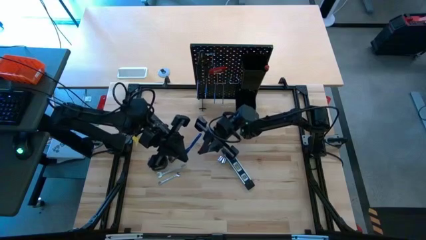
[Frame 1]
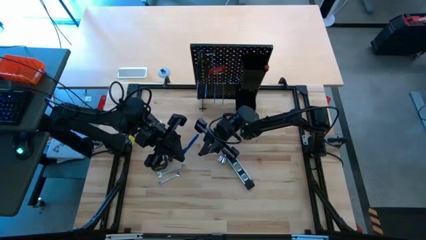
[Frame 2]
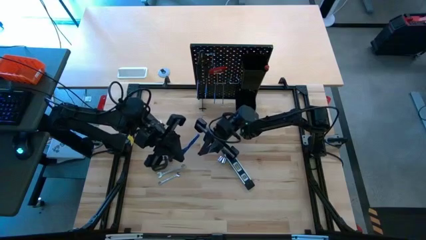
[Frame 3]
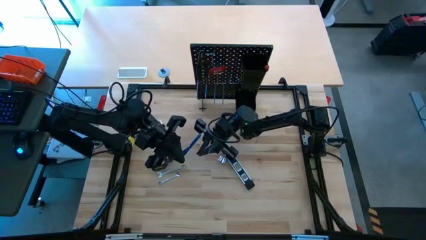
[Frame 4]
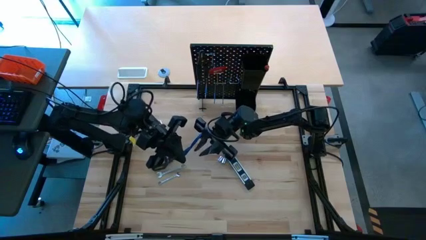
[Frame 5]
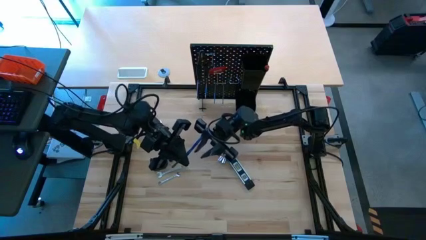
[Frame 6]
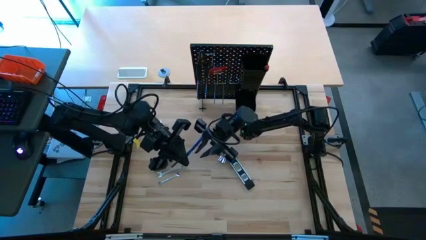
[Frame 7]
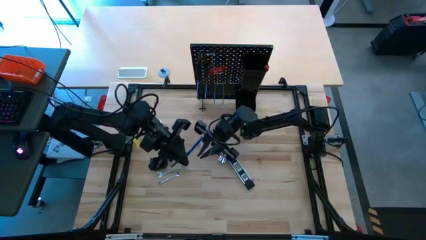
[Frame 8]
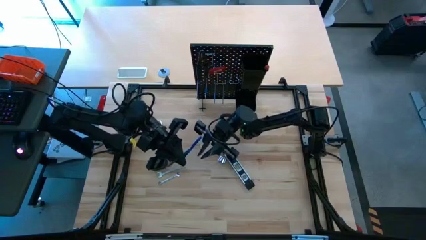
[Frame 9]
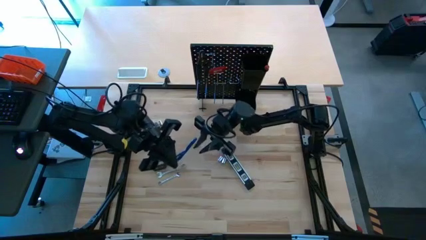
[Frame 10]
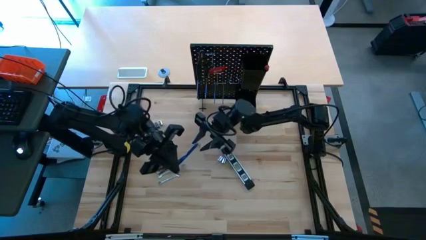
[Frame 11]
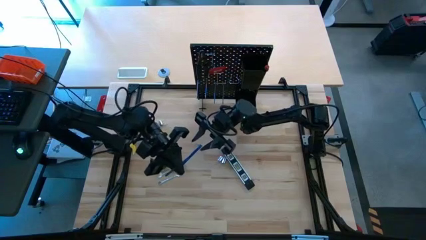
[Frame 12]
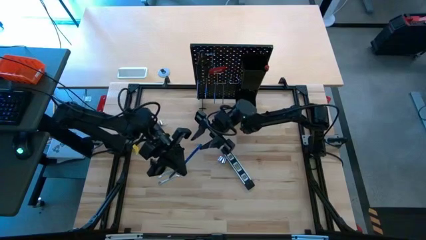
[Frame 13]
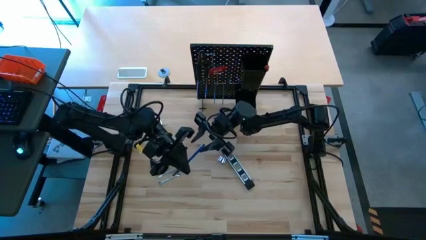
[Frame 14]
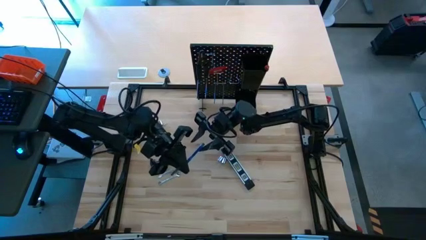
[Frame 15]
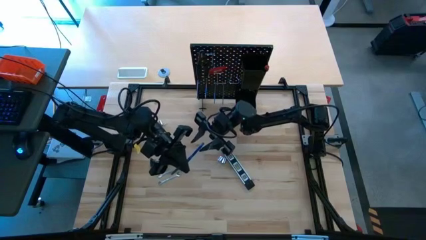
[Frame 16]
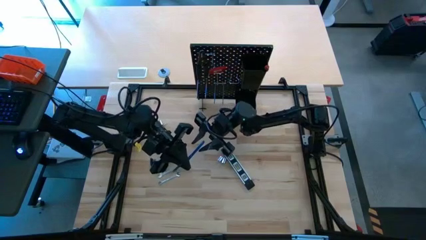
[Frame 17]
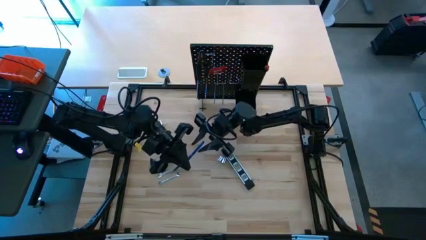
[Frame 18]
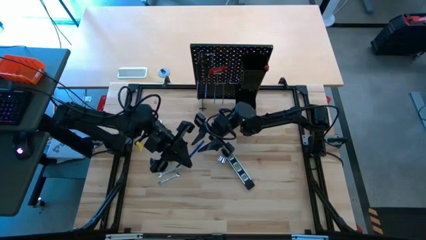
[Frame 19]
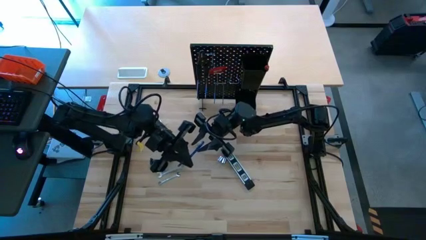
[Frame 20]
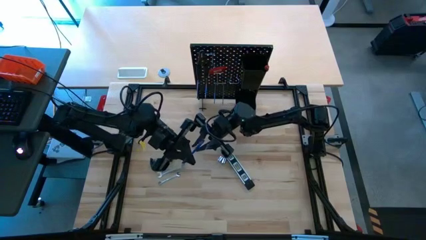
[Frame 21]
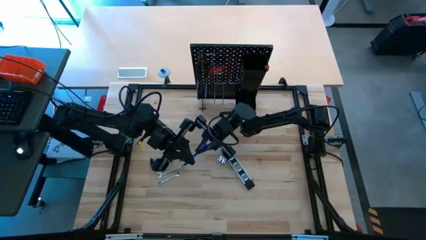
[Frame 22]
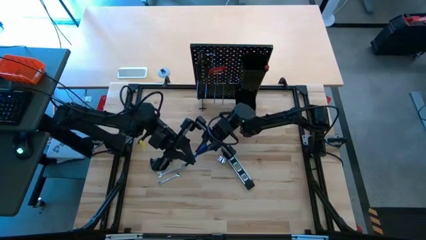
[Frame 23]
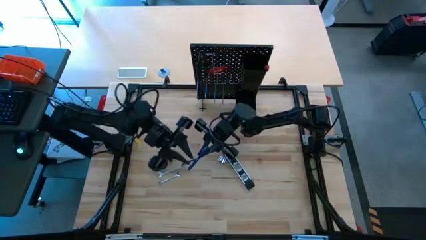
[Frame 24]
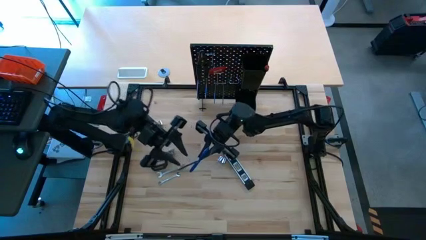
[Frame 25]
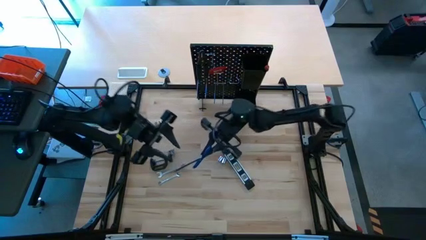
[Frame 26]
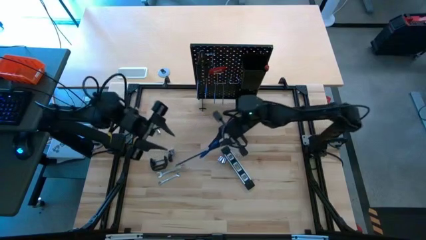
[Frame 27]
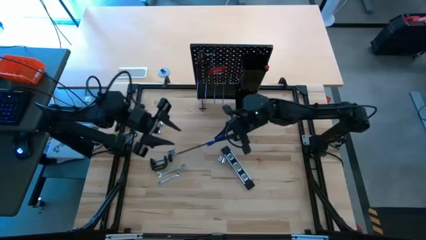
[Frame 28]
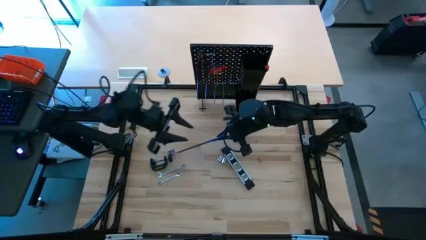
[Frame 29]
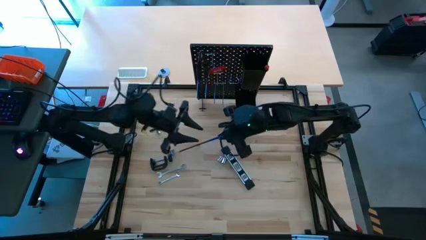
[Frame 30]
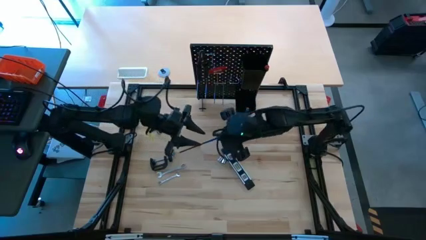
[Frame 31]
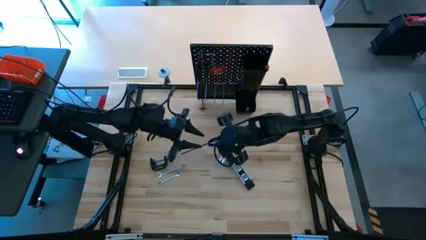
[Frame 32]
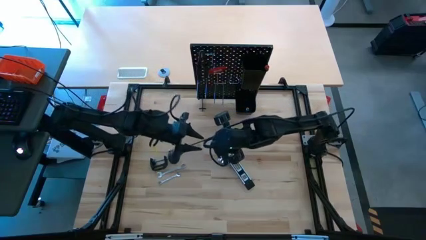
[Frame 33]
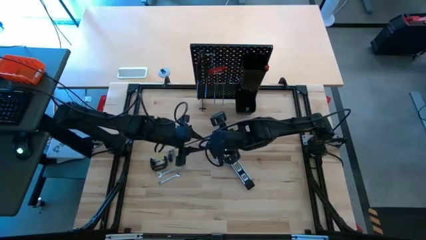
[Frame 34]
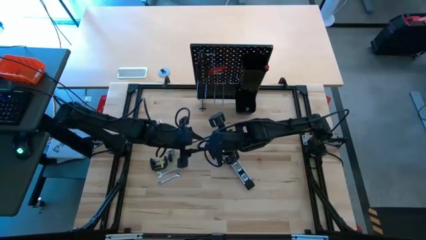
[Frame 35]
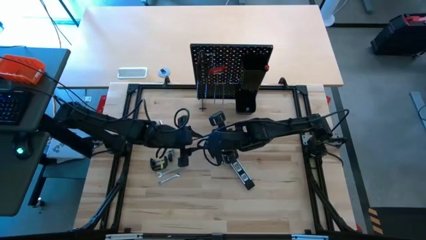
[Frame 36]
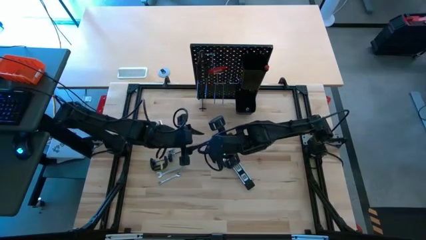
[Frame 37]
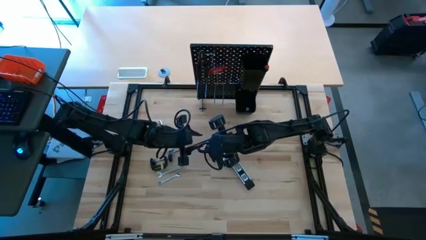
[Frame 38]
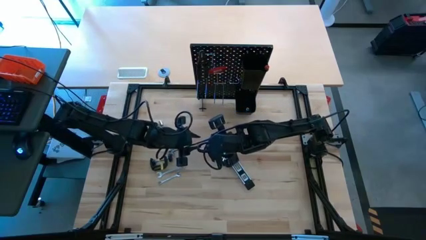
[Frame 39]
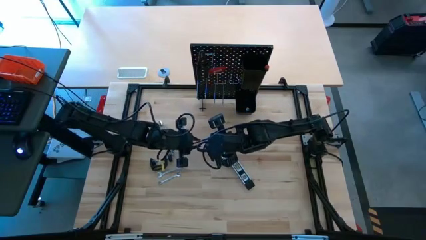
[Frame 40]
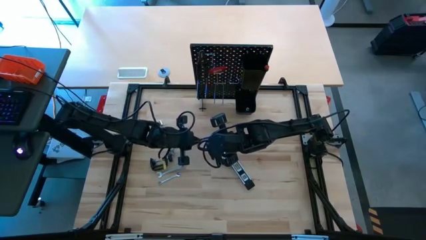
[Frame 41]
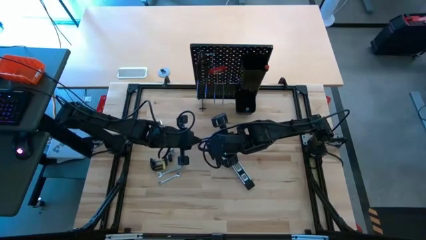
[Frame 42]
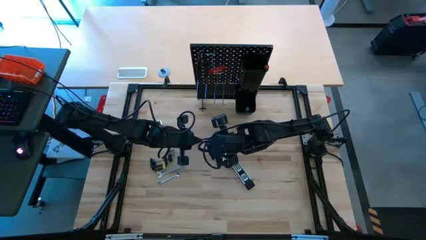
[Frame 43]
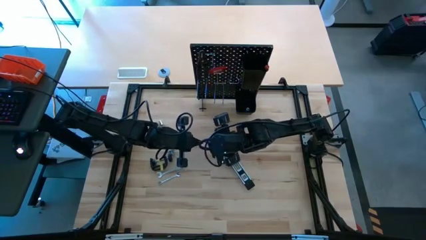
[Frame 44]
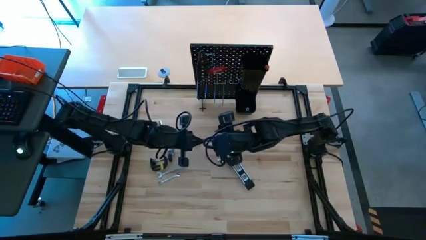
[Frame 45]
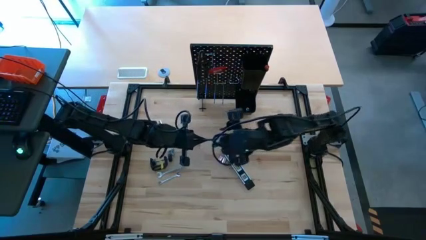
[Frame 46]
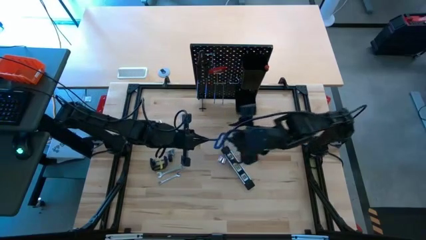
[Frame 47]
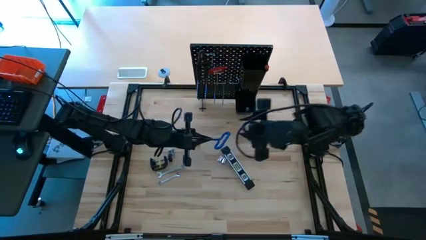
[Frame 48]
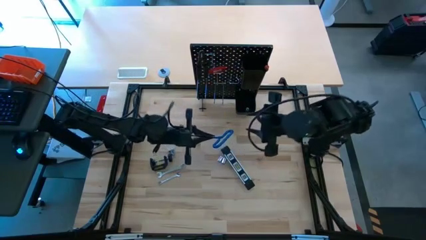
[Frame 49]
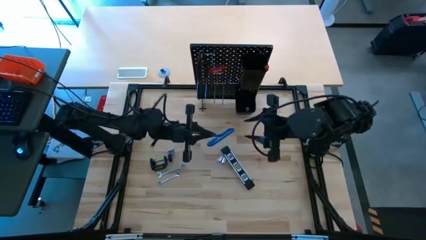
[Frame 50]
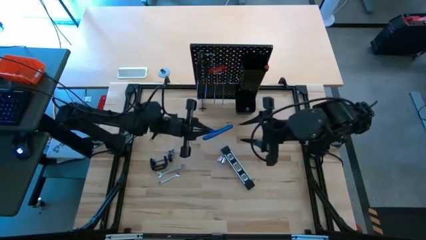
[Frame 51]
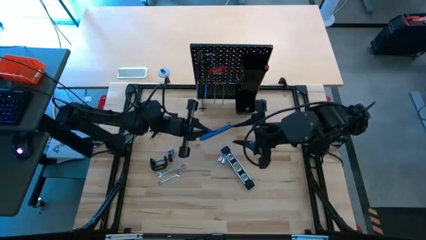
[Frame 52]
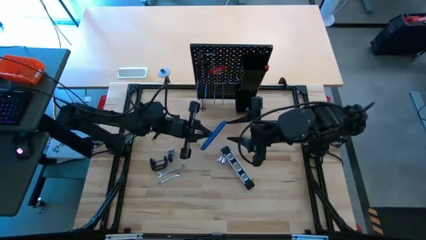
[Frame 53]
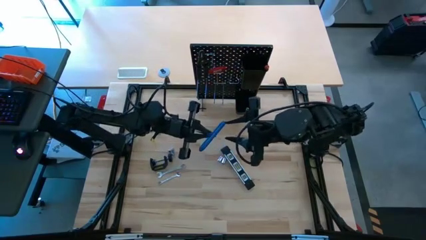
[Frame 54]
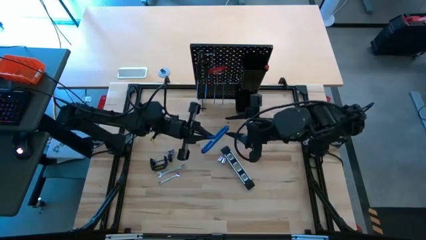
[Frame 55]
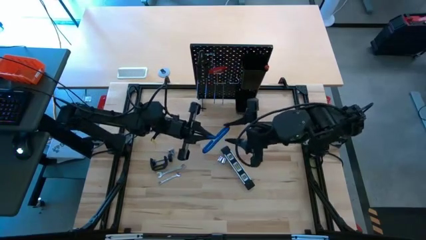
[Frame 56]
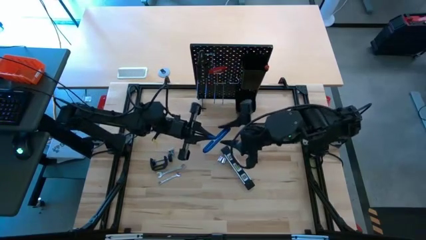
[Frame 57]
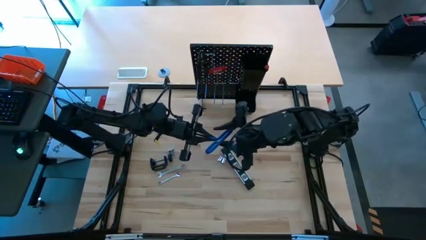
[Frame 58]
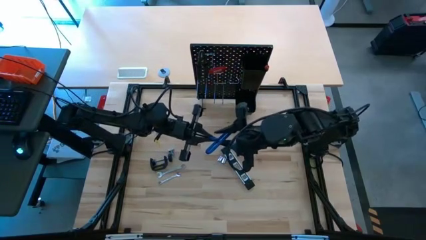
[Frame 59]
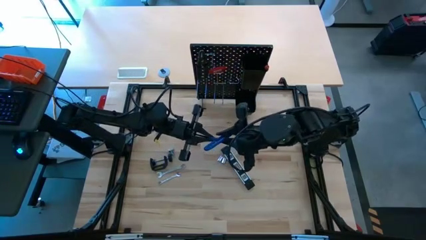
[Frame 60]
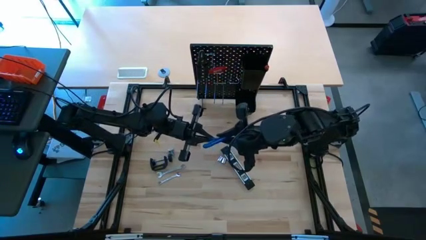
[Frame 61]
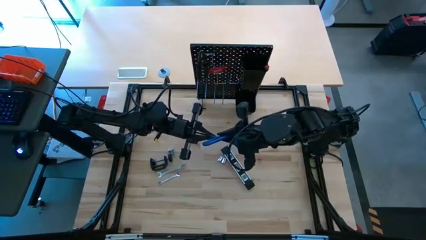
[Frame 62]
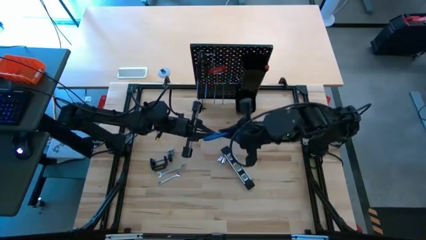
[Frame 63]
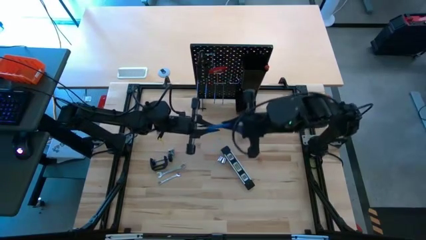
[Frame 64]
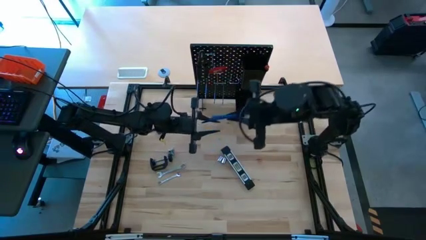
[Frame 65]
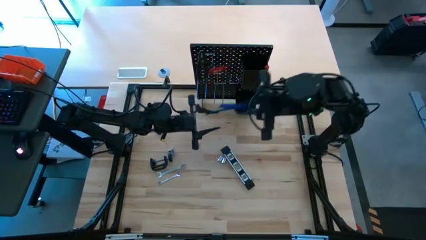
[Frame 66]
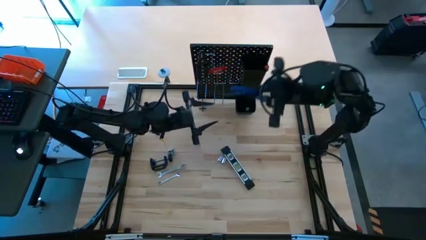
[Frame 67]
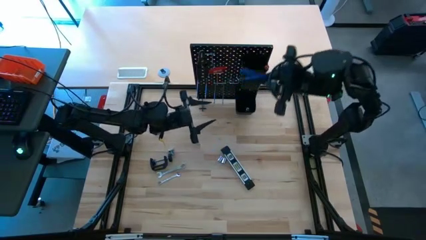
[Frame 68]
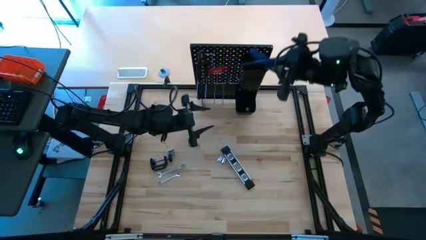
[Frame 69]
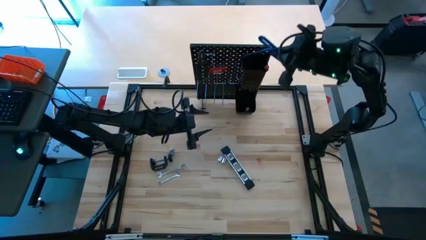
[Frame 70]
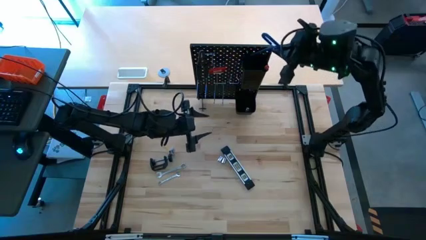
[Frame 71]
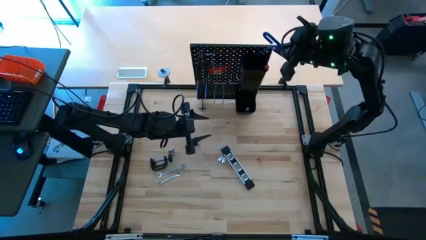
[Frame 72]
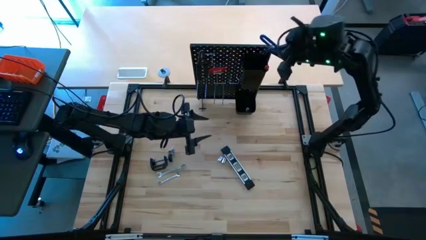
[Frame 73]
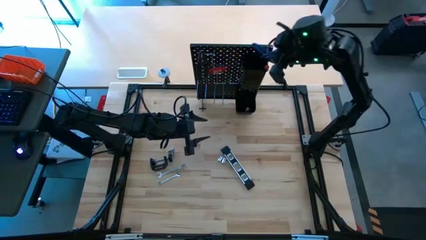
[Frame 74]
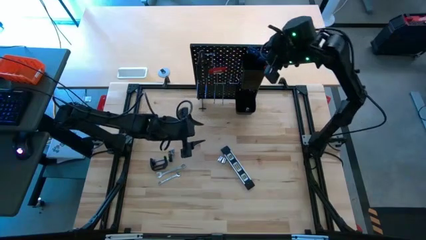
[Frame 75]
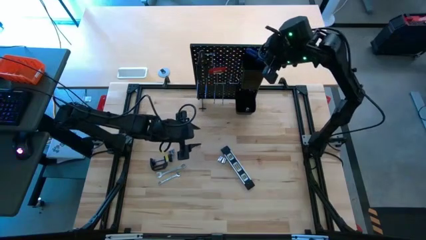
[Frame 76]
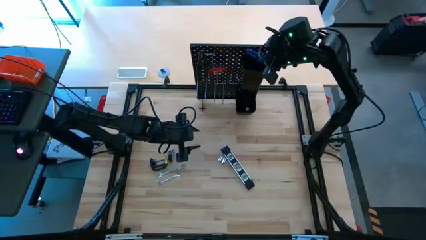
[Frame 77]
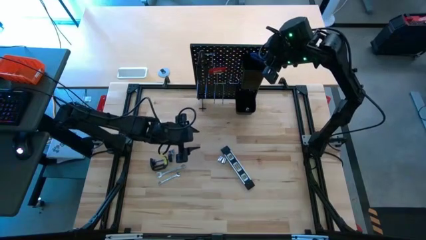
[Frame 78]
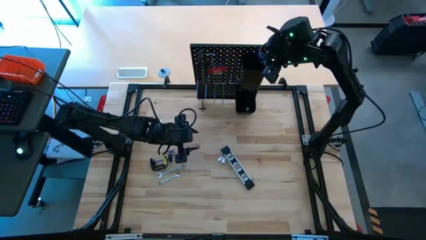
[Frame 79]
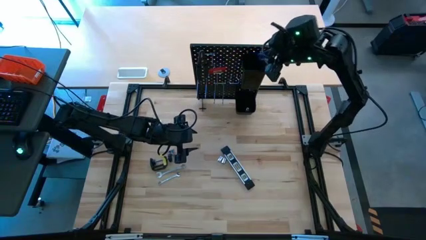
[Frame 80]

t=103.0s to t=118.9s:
Task: Hang tools onto peg board
Put the pick tool into the top black bin on the peg board
